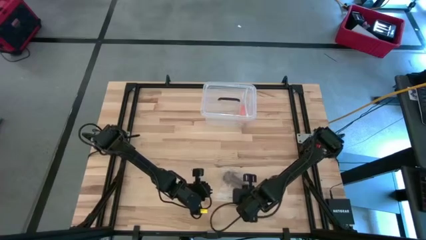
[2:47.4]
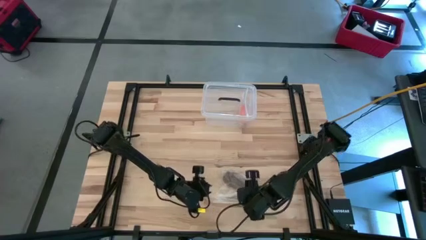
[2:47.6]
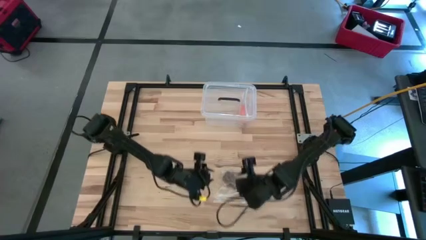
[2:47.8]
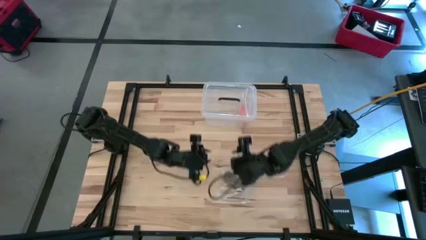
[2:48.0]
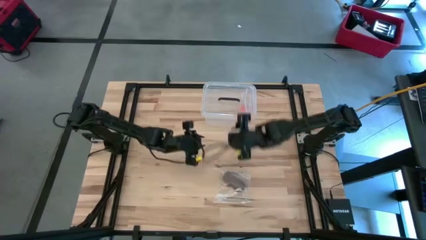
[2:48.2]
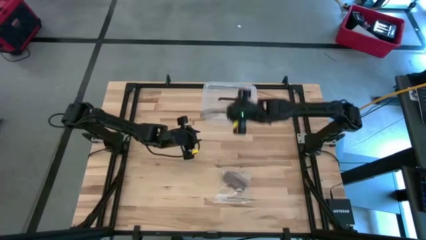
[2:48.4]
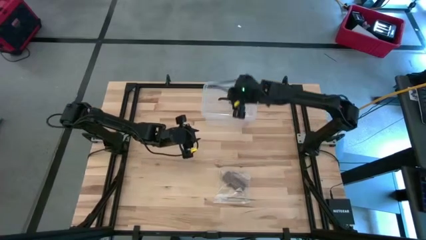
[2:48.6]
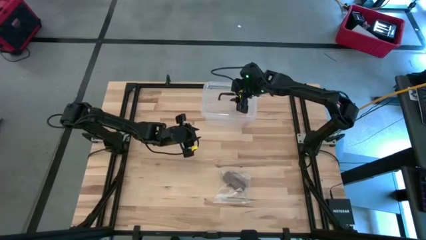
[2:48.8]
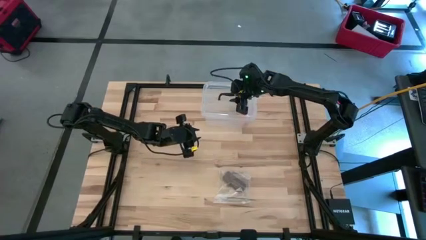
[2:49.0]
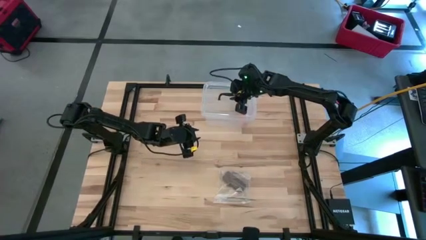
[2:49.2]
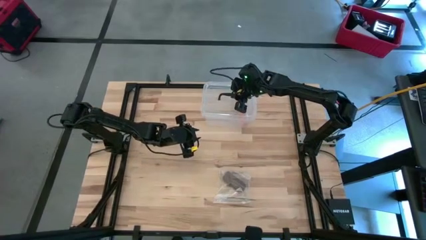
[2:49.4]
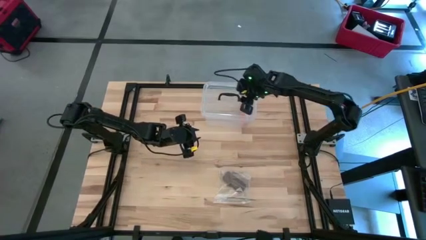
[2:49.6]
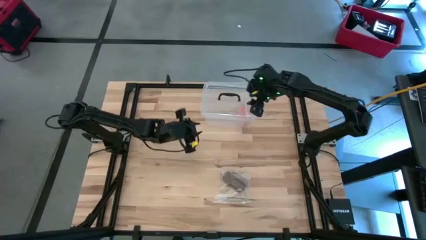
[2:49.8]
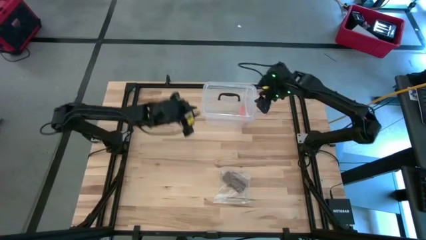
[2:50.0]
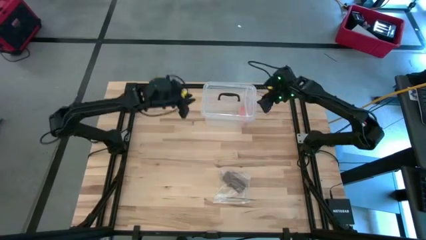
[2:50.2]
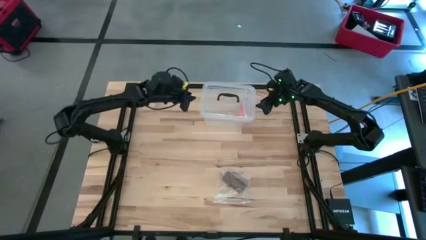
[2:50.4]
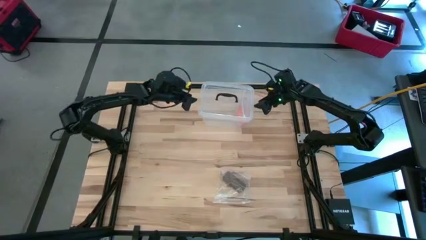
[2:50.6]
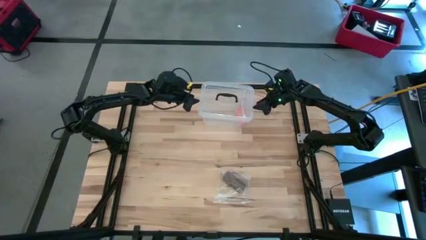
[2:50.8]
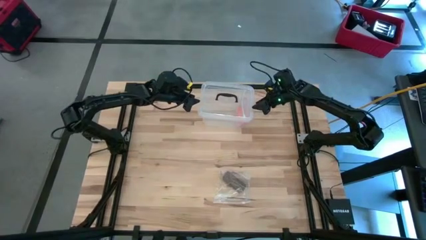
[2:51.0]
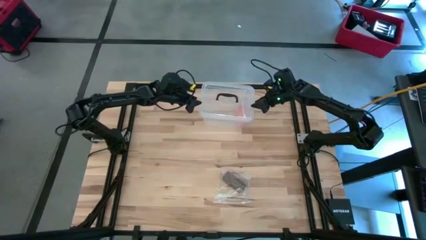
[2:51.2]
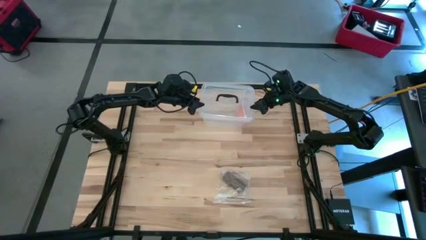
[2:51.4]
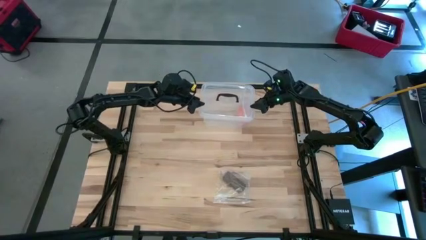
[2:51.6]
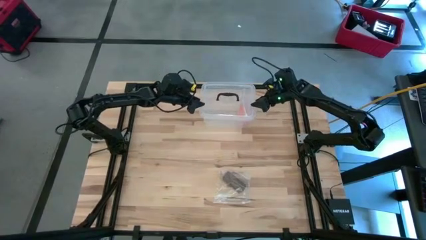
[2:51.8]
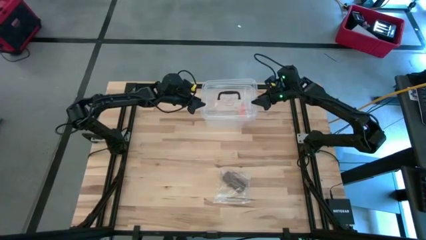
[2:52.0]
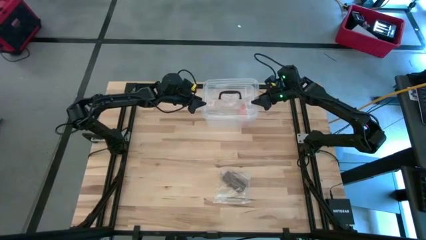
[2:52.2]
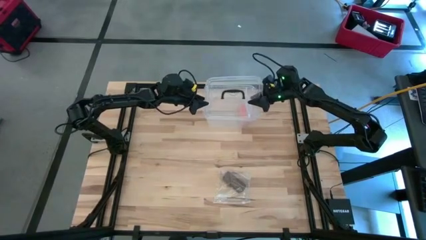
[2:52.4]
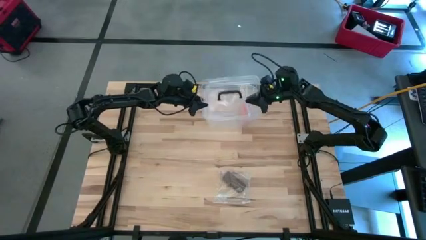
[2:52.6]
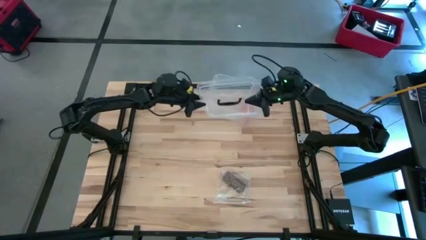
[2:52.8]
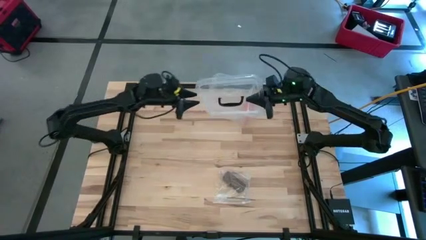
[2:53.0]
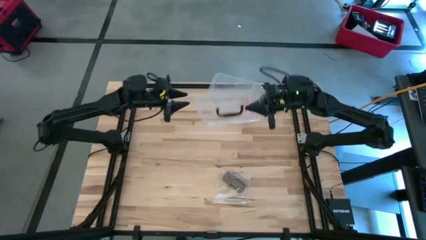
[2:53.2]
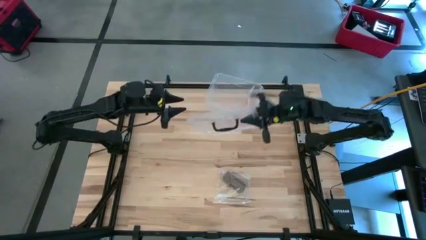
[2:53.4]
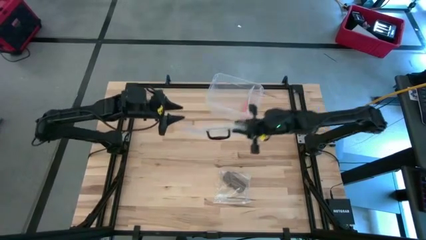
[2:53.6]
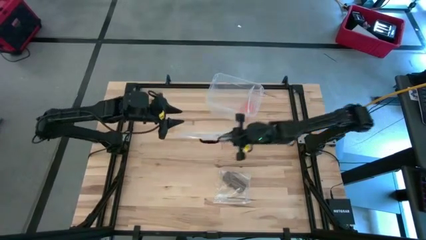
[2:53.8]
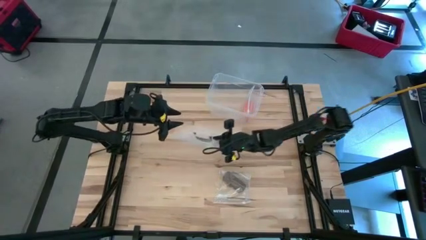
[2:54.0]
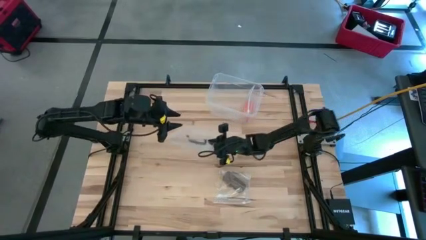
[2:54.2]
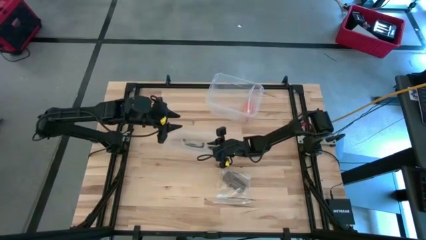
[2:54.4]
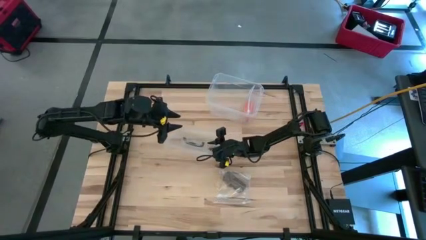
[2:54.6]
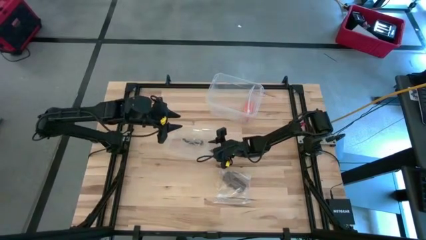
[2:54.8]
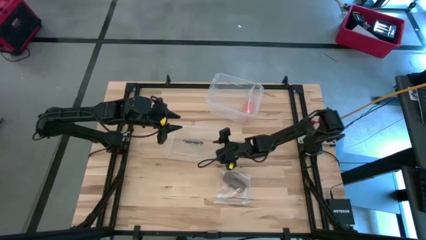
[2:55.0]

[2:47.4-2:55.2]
Task: Roll bandage
Open the container

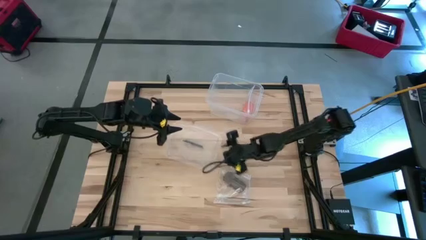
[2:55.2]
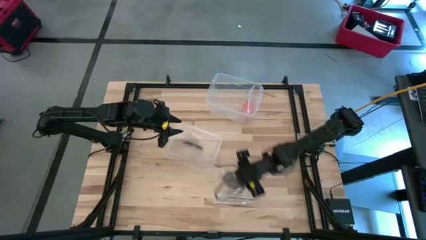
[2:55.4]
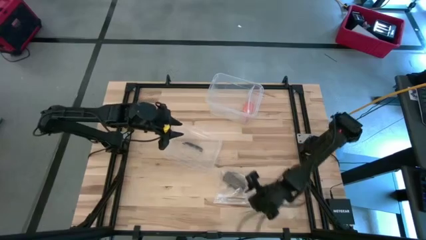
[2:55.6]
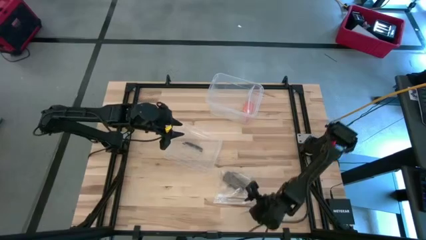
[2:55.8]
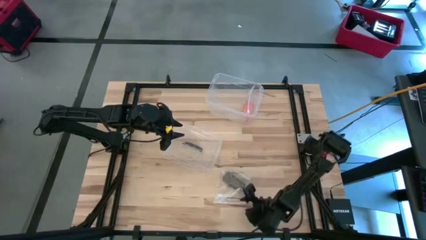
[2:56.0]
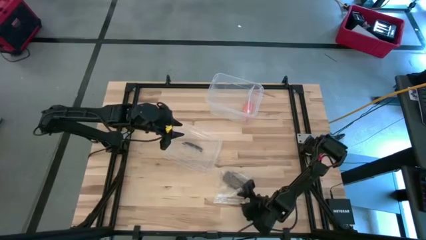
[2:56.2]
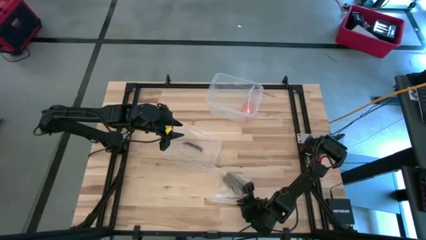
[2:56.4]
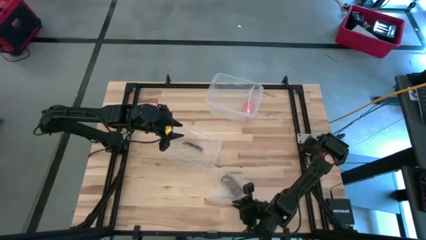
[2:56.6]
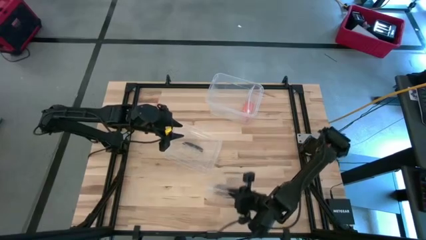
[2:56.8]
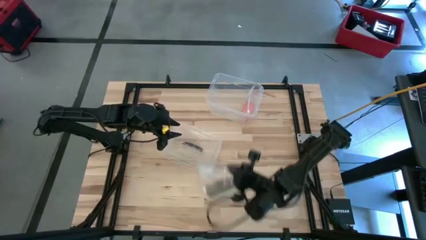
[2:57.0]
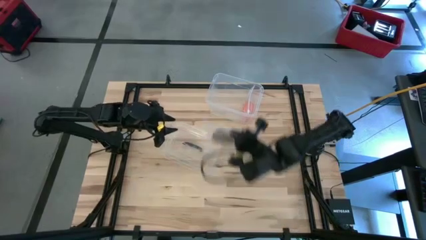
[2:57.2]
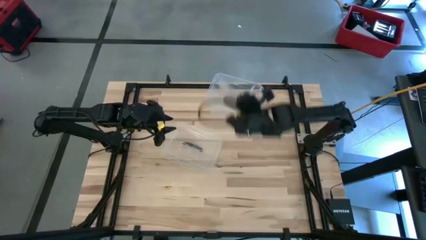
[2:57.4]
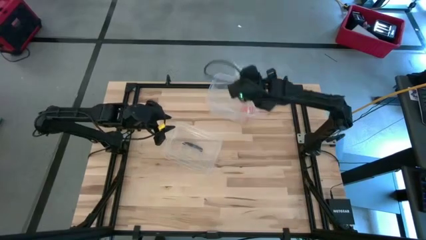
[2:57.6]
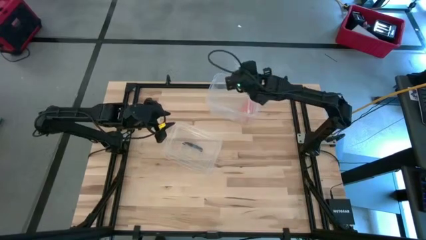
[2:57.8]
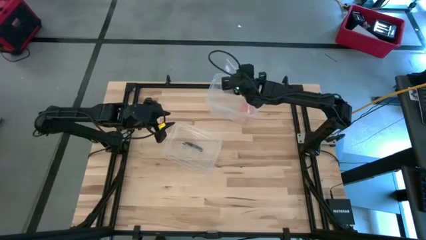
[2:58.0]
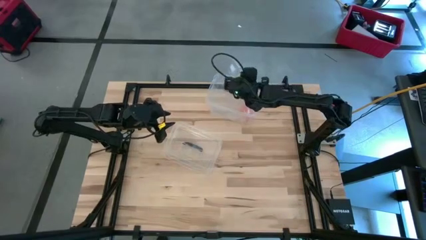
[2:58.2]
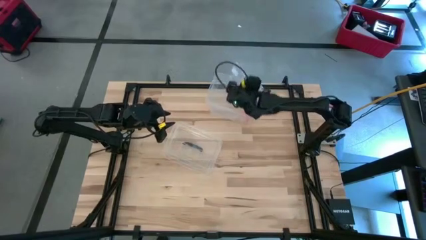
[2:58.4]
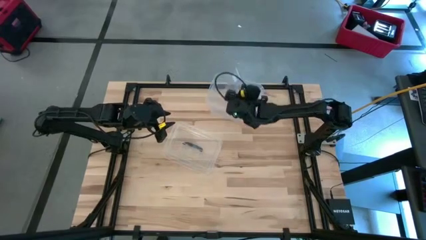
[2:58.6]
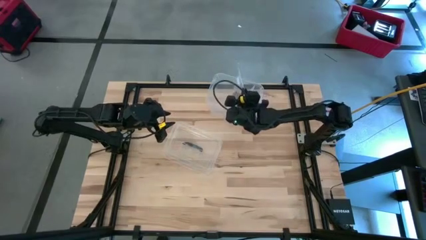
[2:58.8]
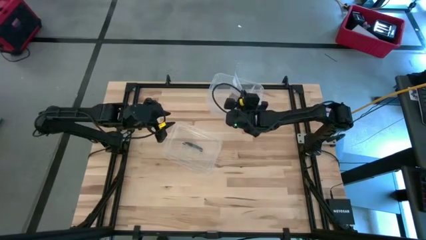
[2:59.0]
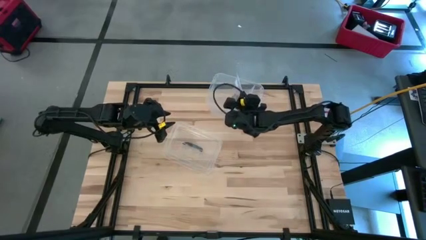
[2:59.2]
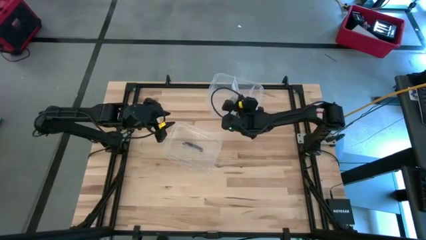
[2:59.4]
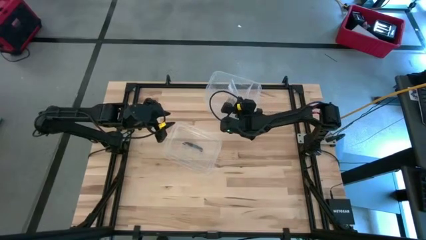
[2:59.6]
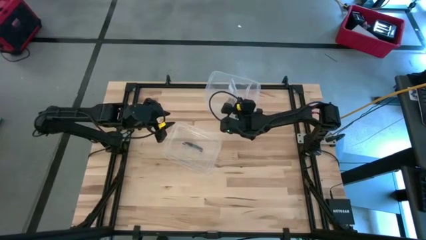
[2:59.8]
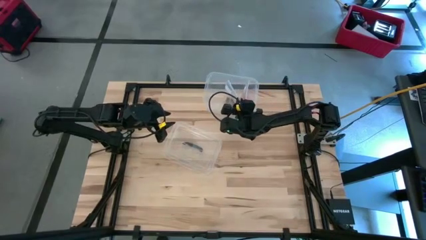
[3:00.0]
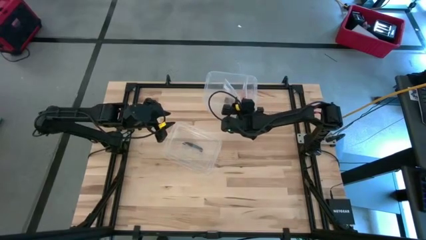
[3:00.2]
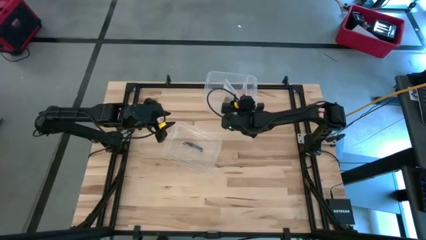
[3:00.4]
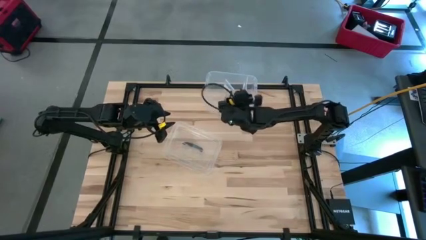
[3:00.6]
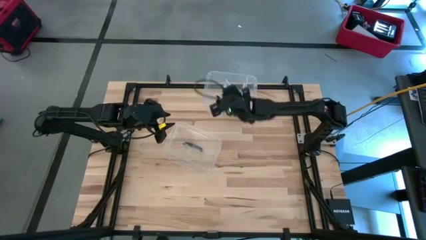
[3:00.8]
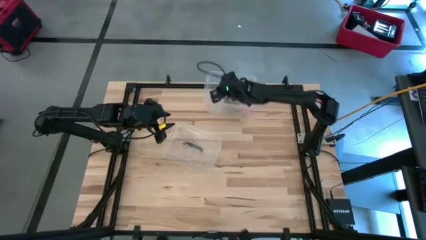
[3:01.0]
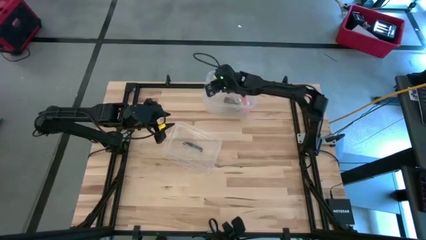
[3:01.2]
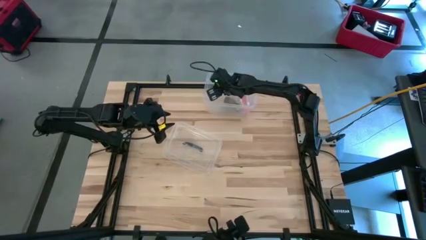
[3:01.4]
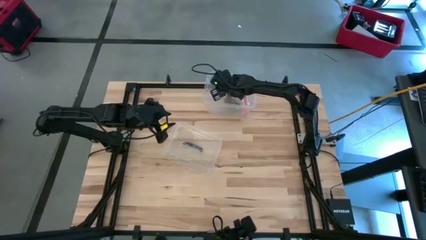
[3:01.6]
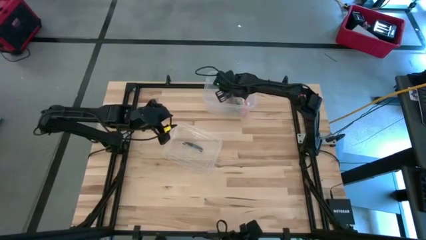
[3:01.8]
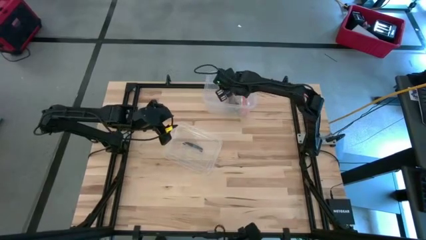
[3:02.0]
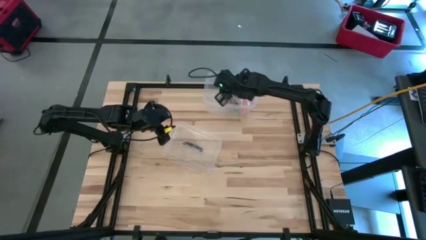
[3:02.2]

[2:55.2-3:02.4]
Put the transparent zip bag into the container
